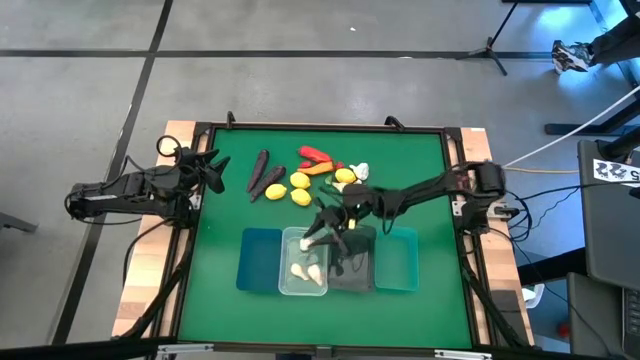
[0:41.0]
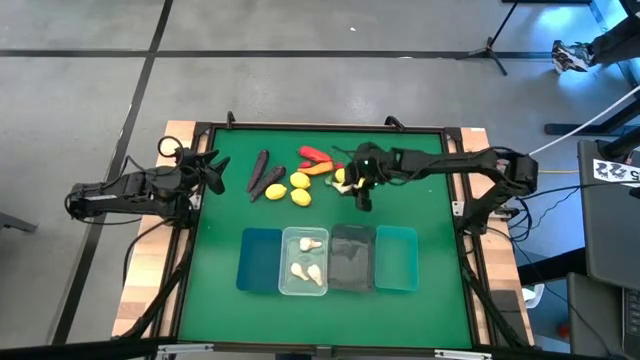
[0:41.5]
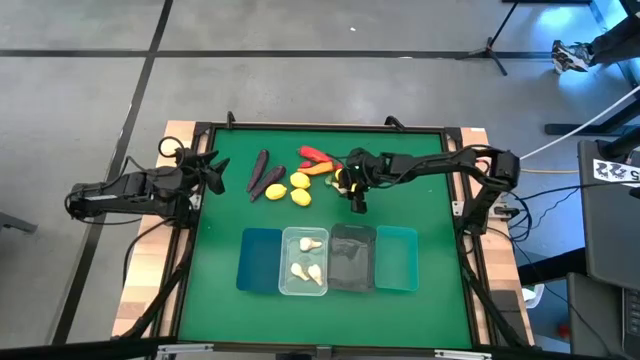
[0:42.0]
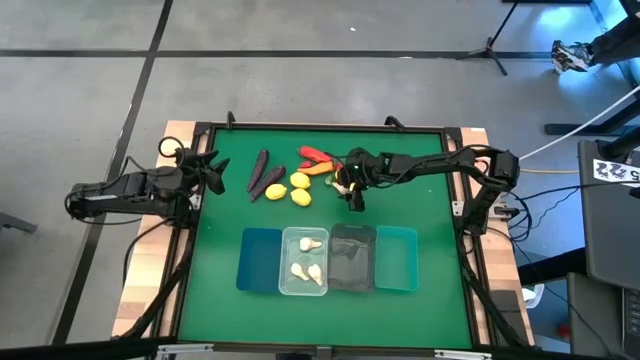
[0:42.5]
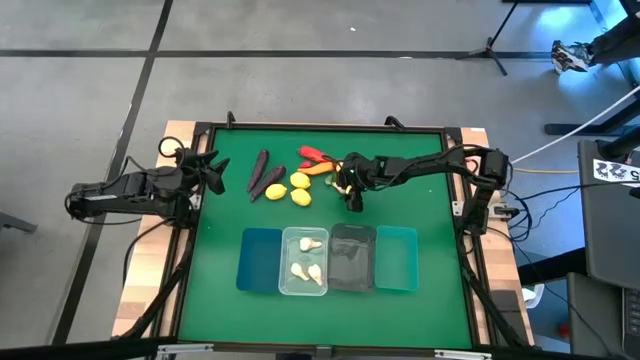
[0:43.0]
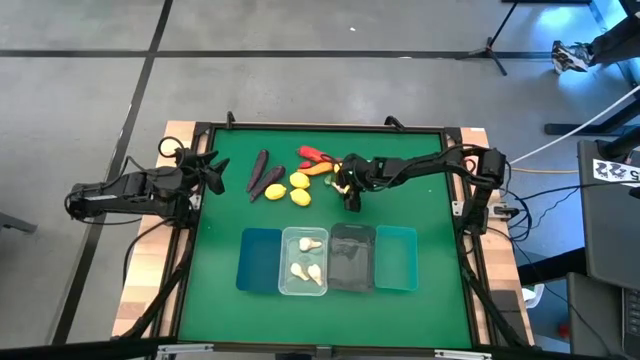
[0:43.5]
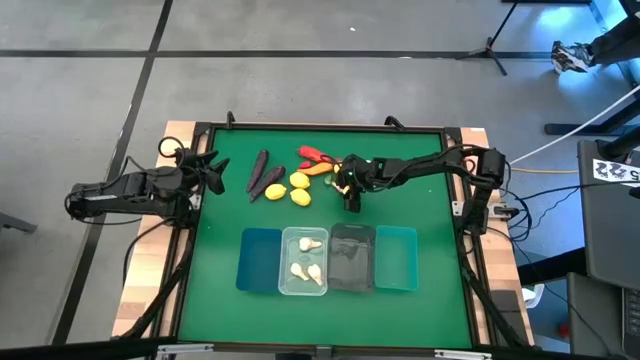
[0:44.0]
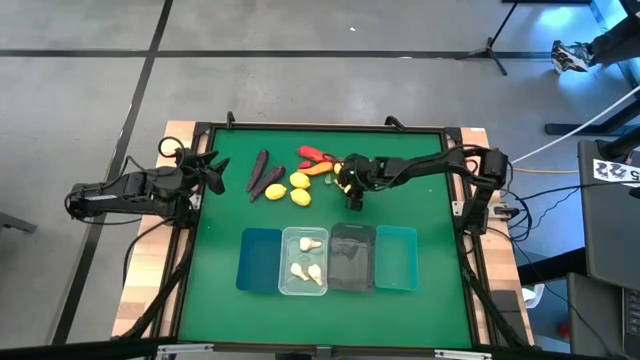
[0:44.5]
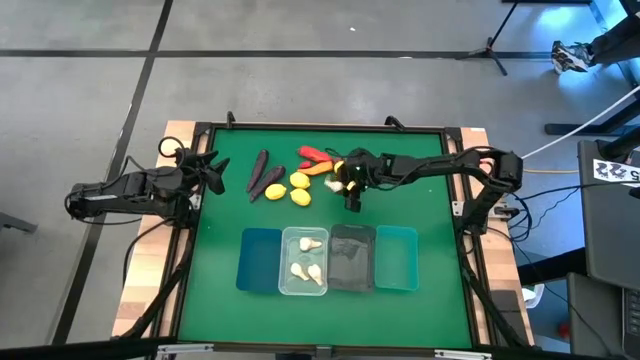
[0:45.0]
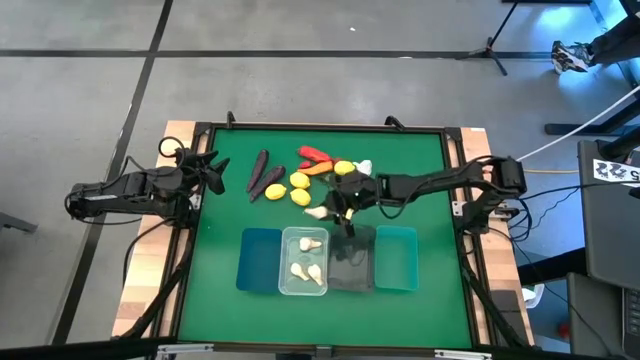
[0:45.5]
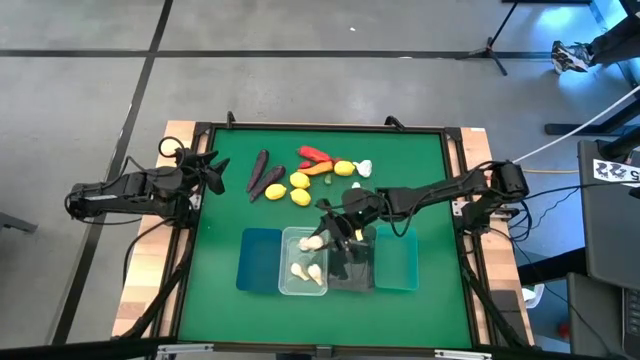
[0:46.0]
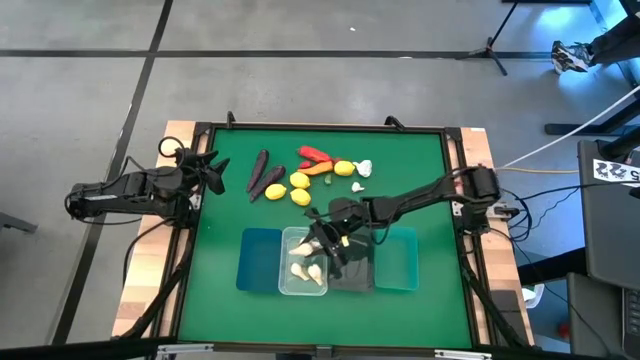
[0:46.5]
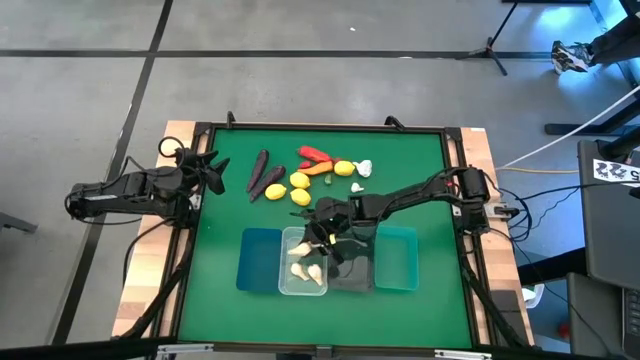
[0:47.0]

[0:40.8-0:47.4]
Task: Sort produce into baskets
Put the white garlic into the transparent bin

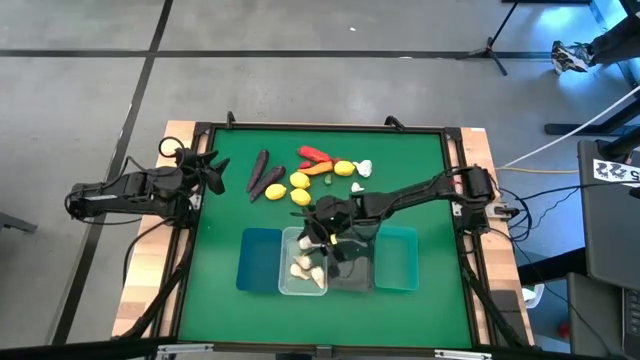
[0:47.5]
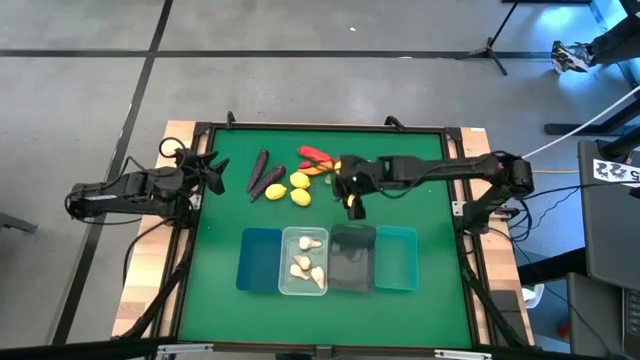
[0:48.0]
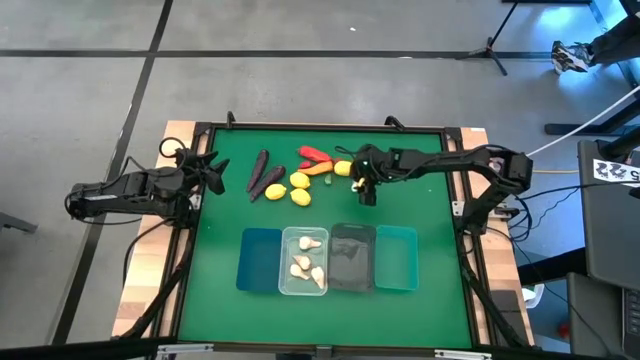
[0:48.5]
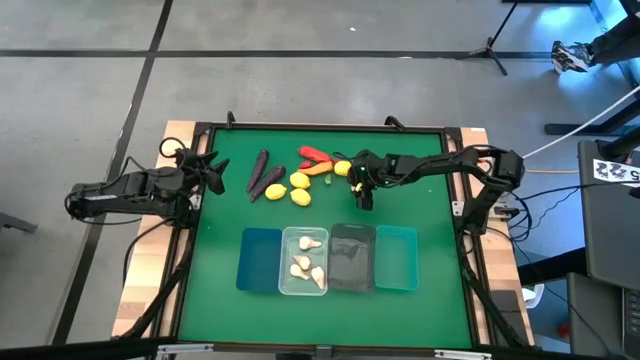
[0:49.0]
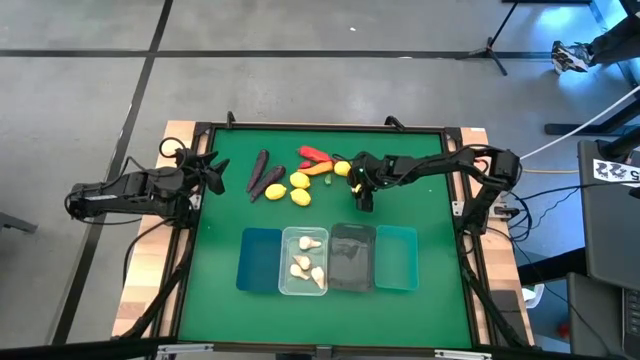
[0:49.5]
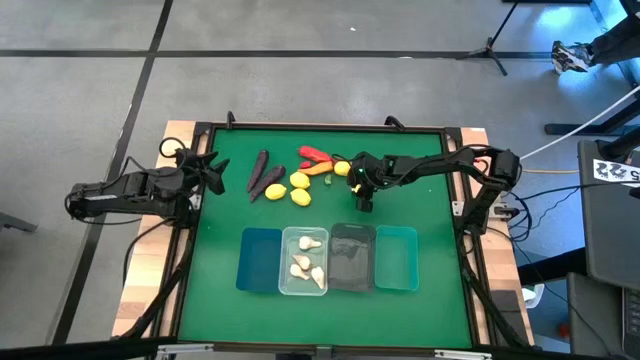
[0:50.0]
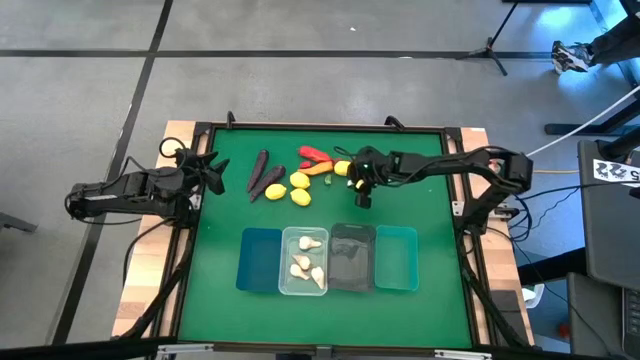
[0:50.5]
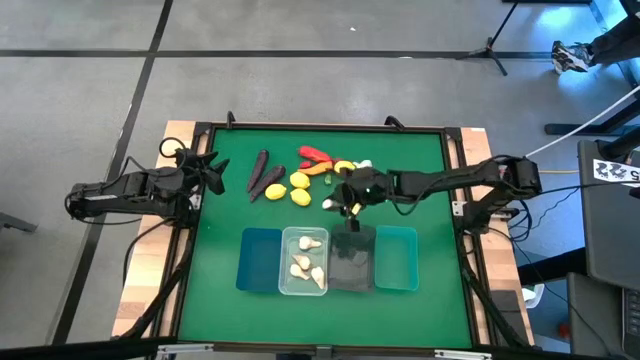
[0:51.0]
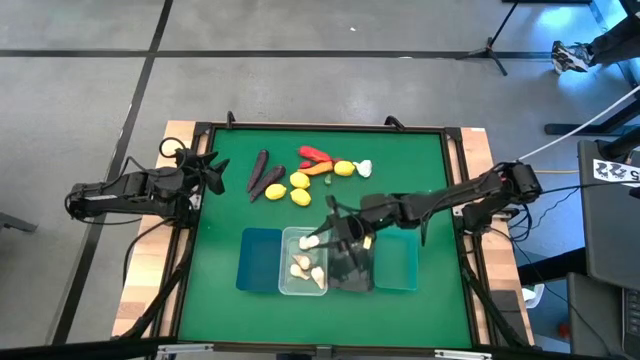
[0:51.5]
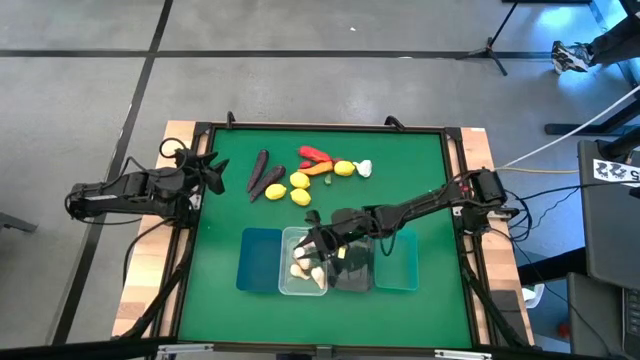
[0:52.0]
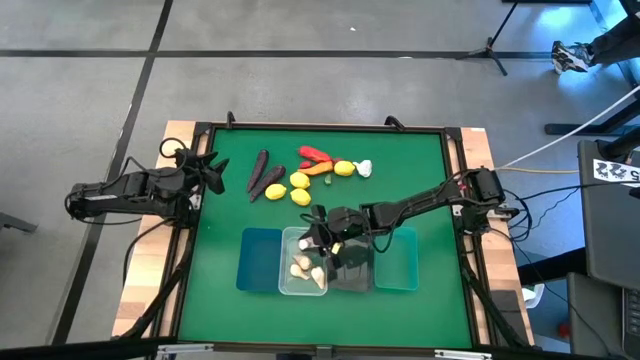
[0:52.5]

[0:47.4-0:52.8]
Put the white garlic into the transparent bin

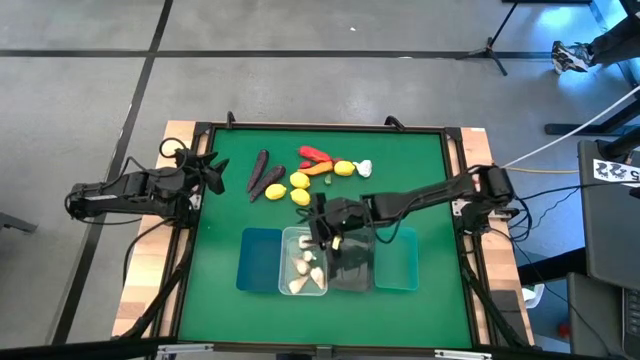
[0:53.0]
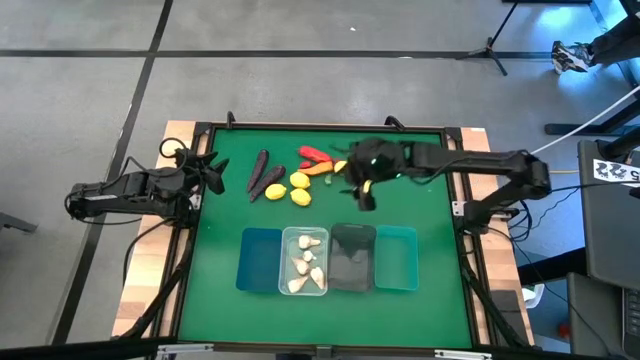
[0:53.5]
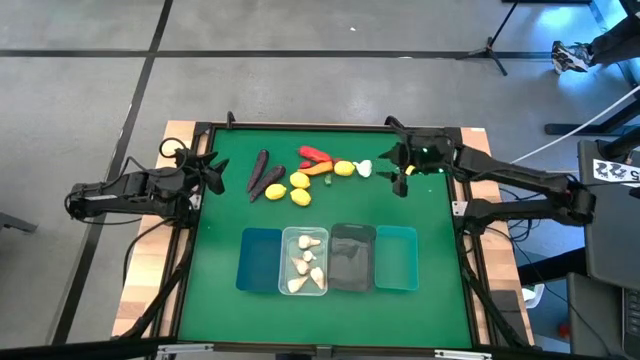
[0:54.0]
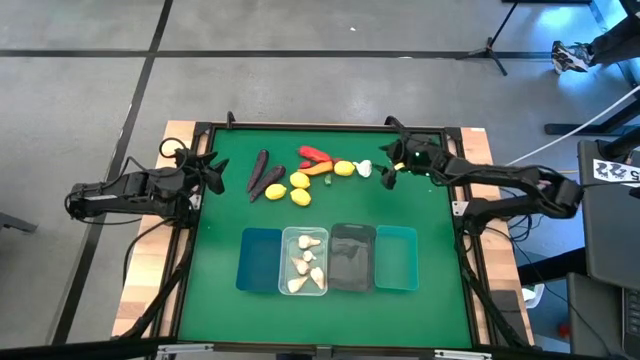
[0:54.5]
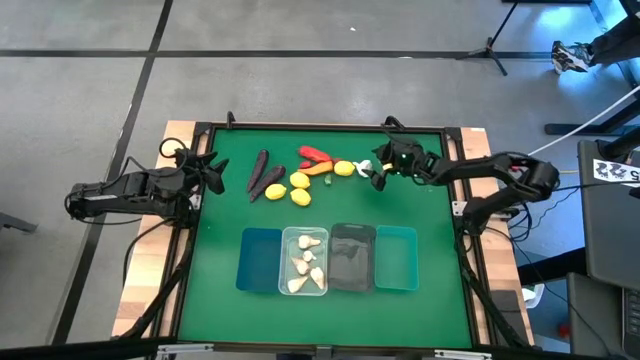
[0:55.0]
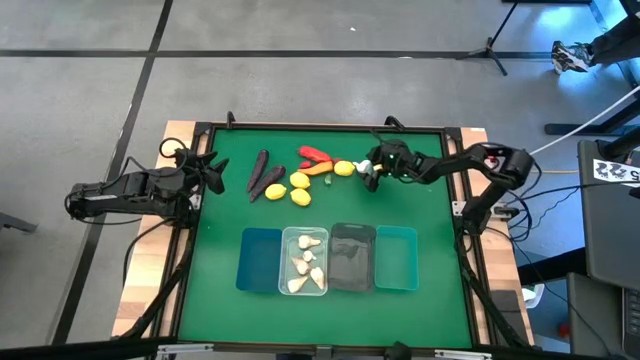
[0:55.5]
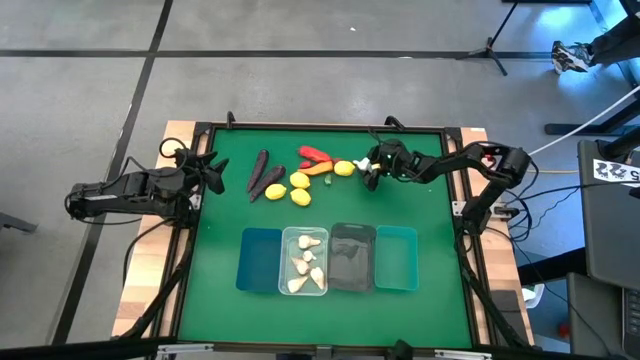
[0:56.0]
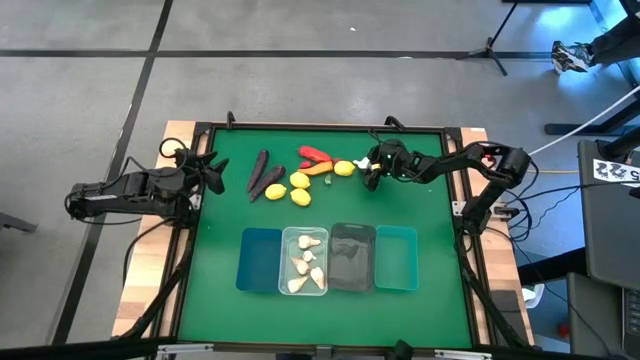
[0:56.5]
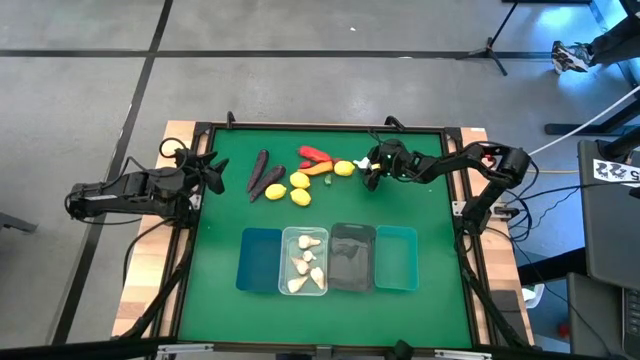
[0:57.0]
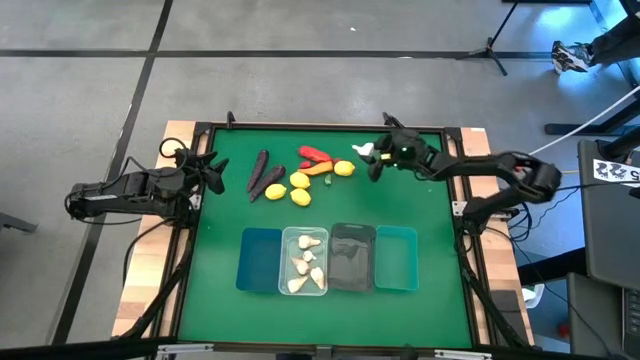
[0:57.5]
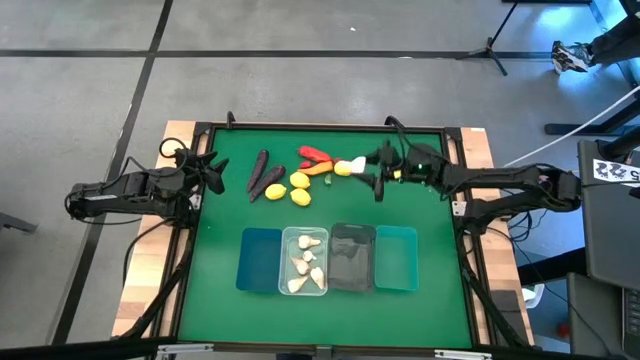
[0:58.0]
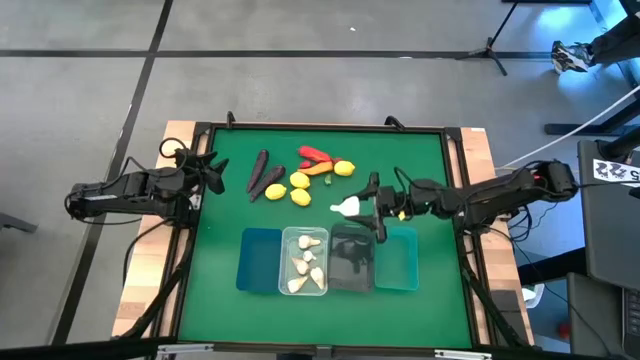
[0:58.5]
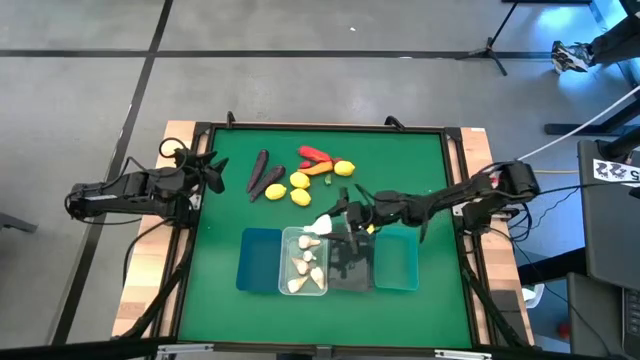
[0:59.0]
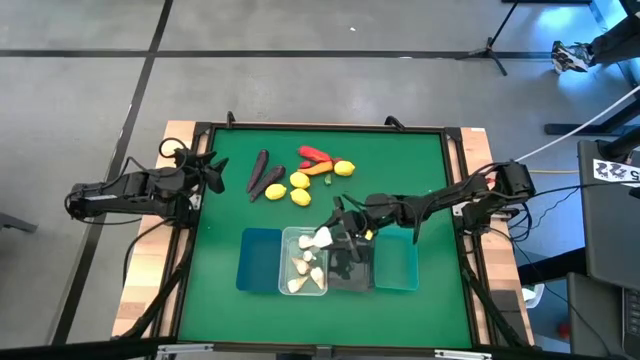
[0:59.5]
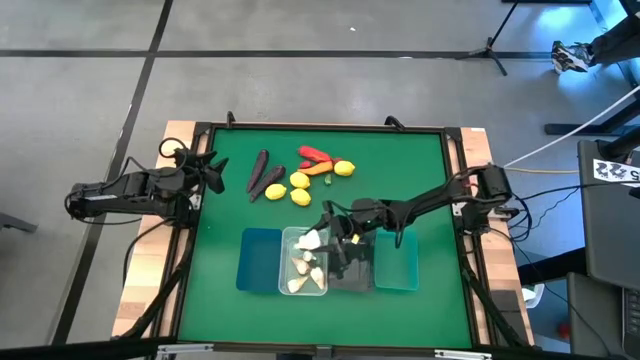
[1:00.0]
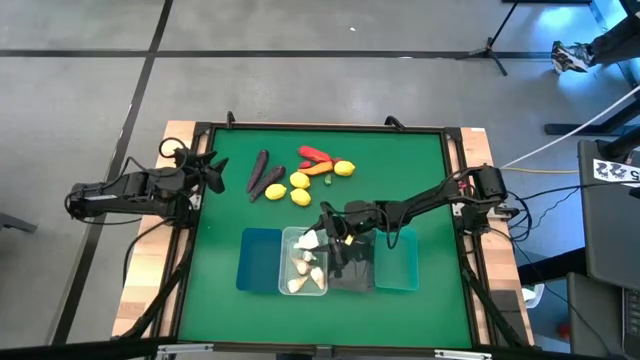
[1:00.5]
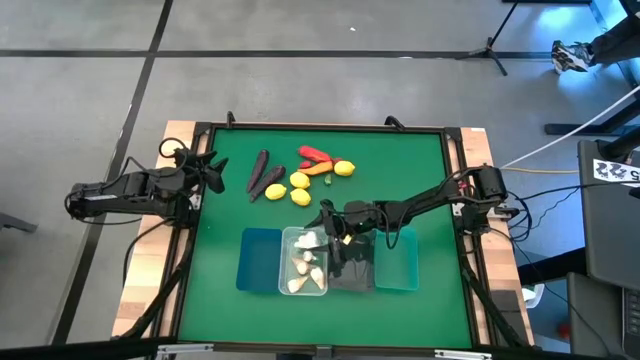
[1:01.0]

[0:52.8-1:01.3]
Put the white garlic into the transparent bin
